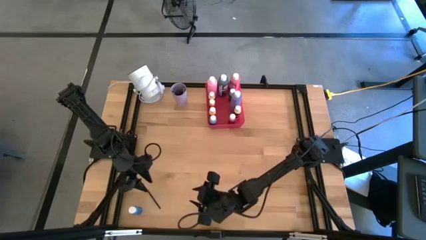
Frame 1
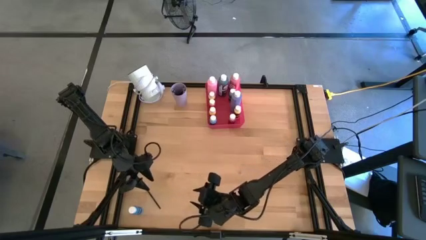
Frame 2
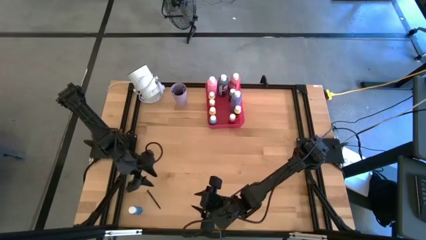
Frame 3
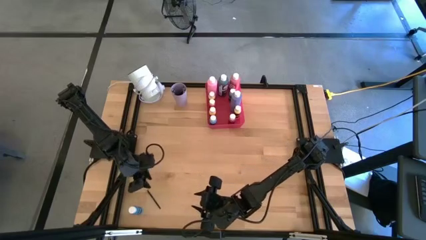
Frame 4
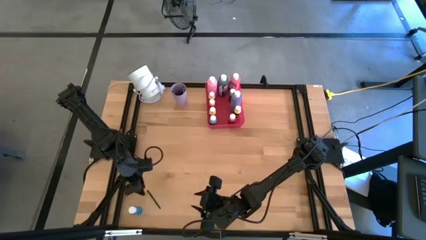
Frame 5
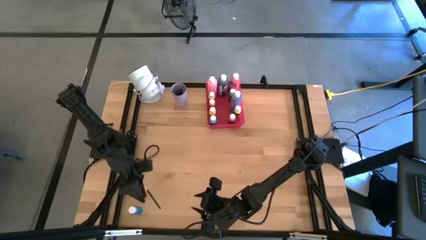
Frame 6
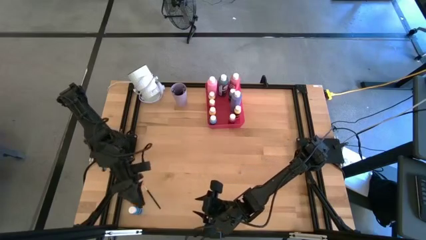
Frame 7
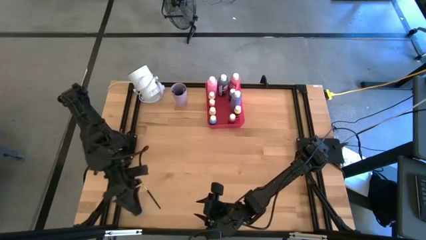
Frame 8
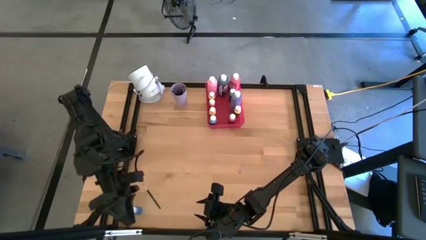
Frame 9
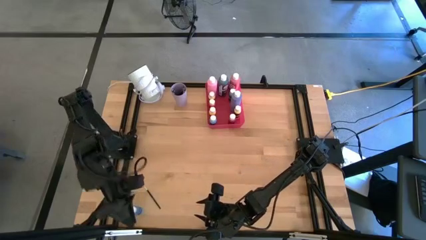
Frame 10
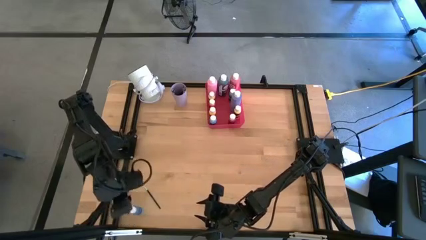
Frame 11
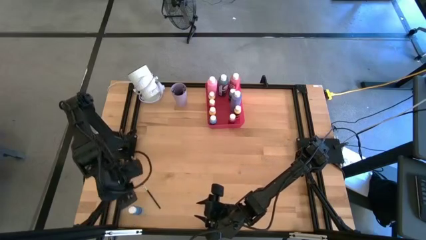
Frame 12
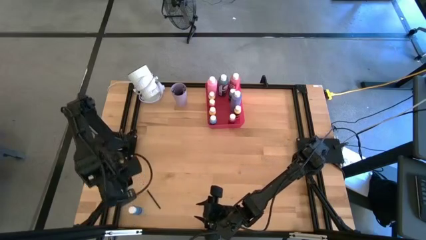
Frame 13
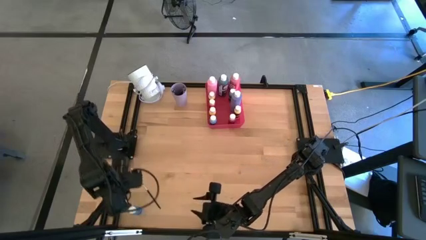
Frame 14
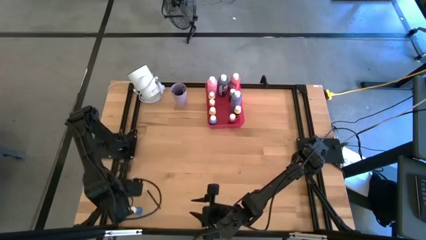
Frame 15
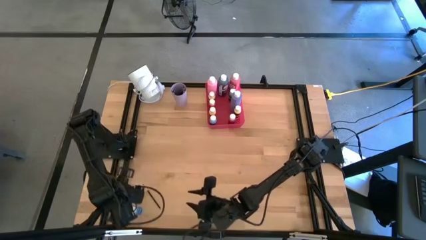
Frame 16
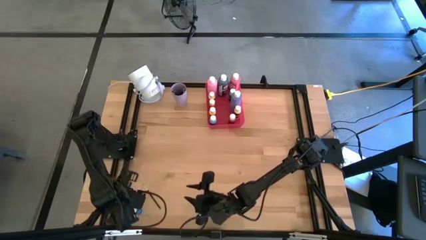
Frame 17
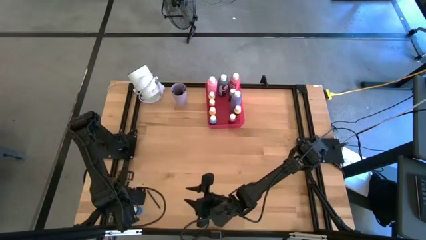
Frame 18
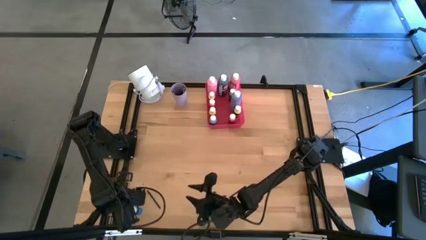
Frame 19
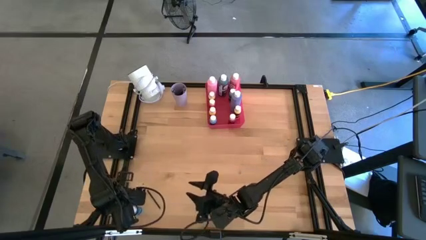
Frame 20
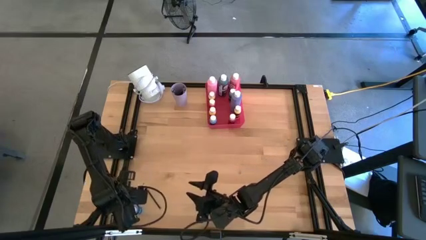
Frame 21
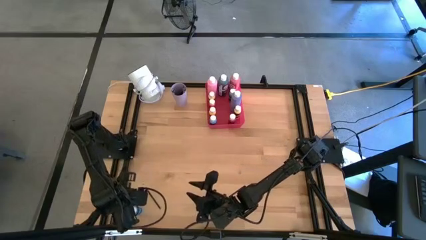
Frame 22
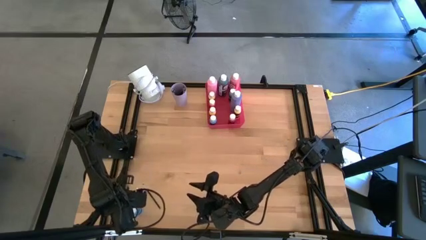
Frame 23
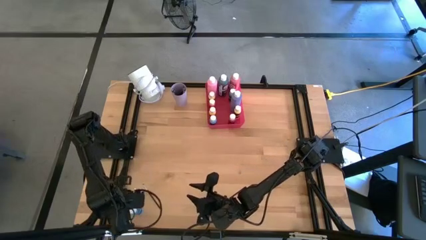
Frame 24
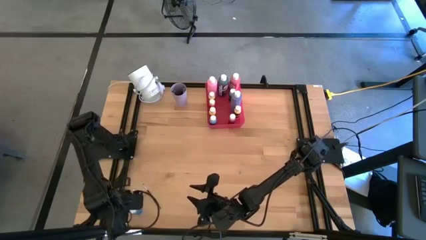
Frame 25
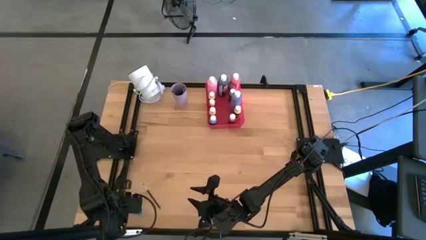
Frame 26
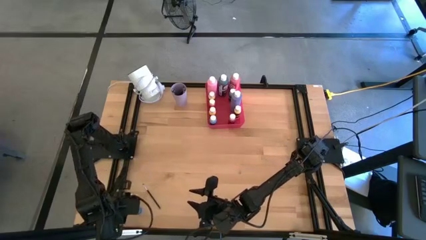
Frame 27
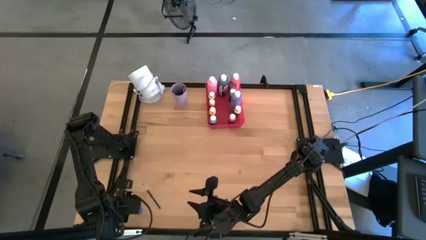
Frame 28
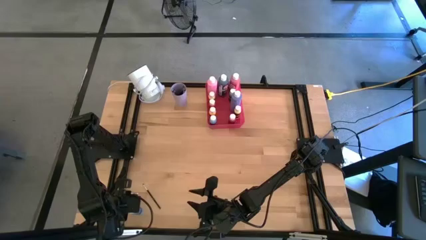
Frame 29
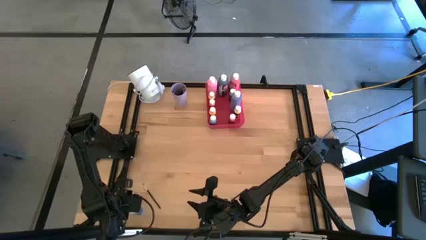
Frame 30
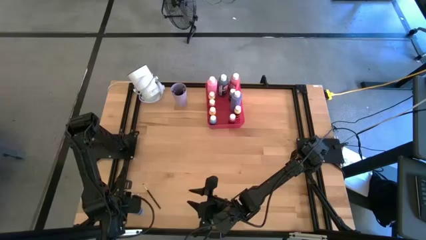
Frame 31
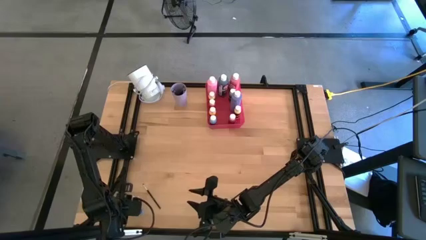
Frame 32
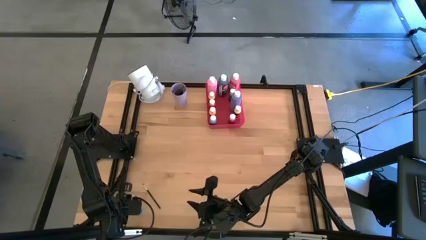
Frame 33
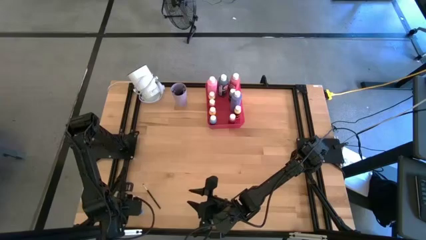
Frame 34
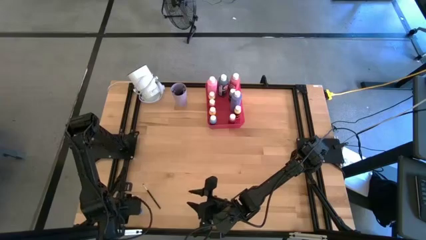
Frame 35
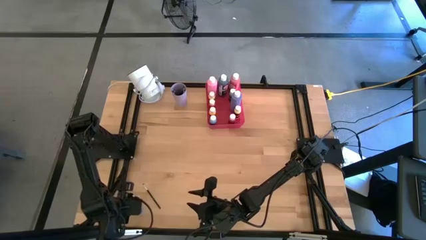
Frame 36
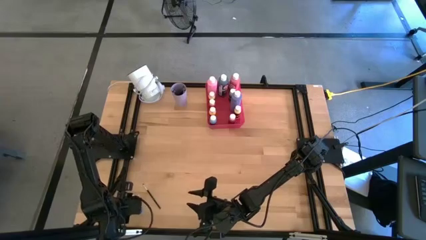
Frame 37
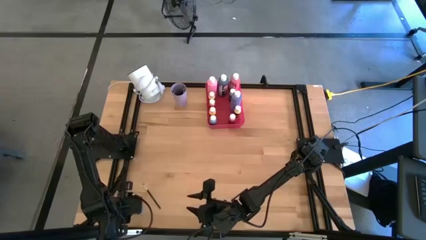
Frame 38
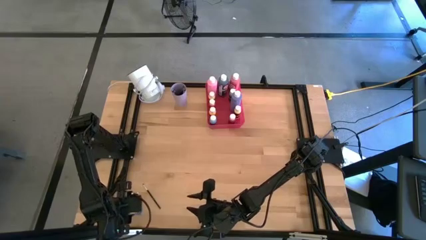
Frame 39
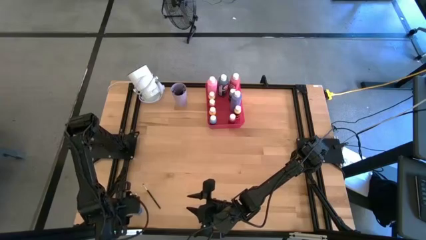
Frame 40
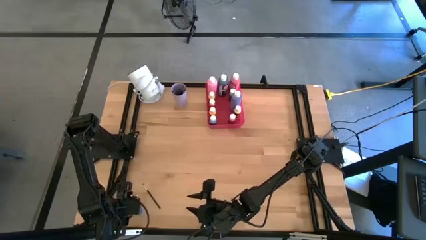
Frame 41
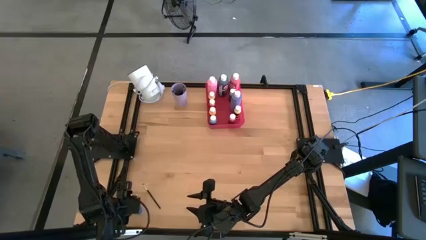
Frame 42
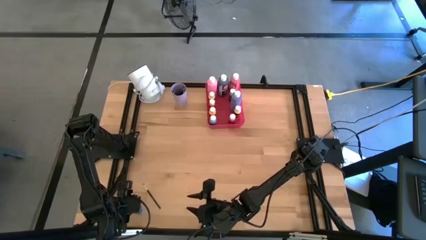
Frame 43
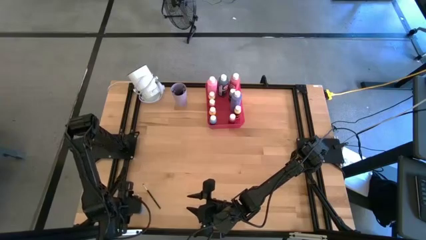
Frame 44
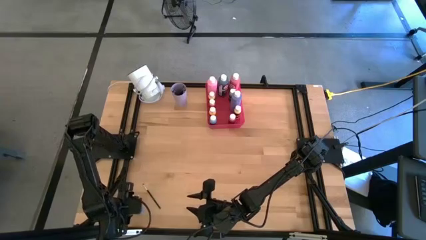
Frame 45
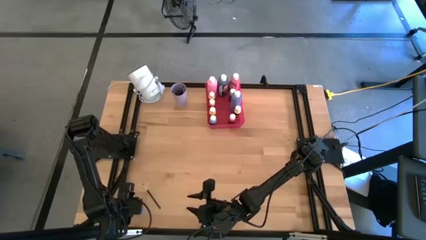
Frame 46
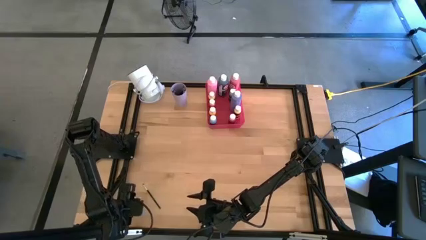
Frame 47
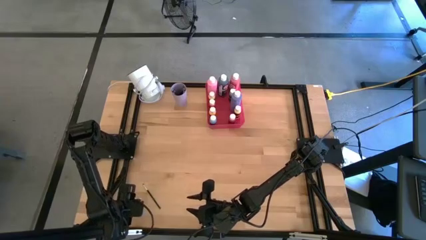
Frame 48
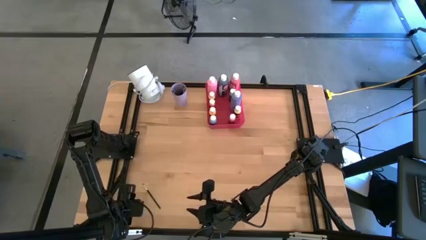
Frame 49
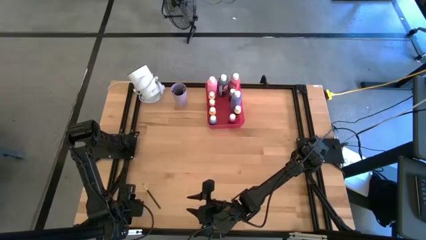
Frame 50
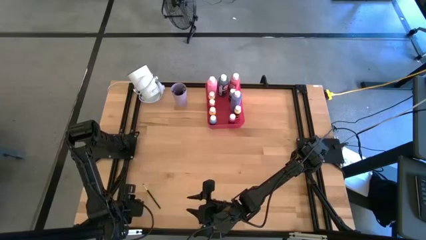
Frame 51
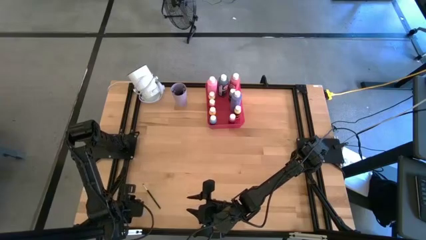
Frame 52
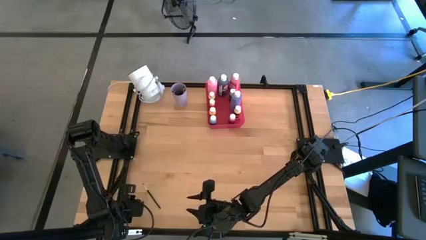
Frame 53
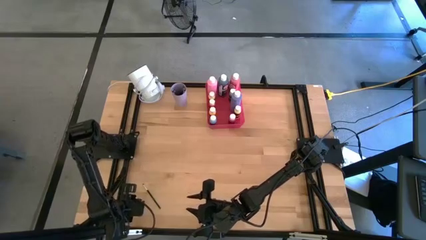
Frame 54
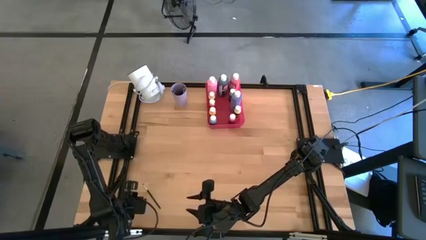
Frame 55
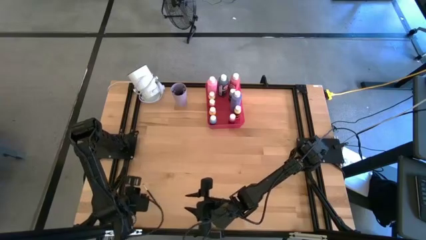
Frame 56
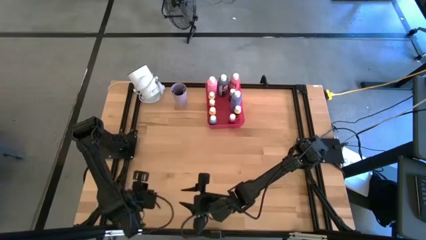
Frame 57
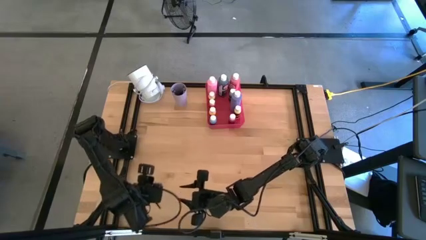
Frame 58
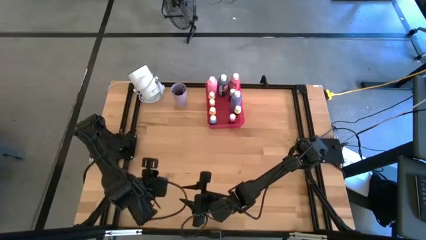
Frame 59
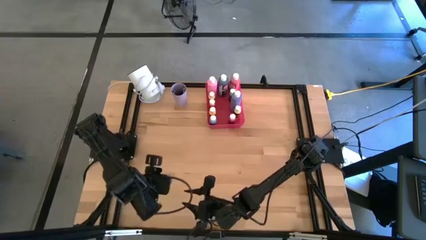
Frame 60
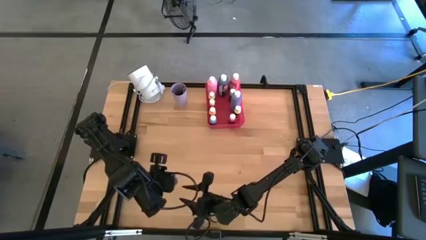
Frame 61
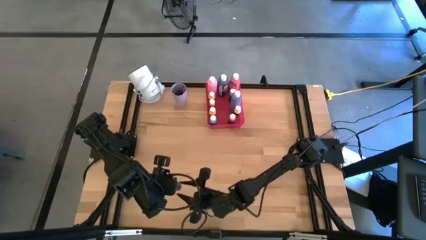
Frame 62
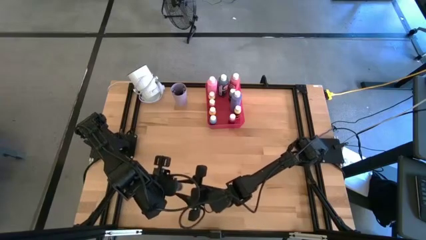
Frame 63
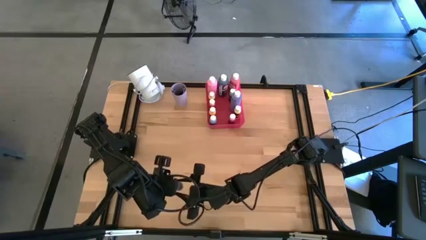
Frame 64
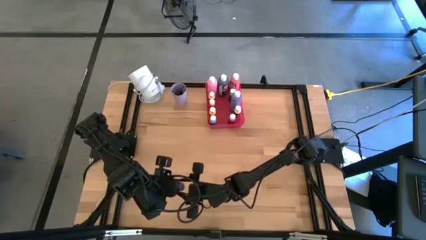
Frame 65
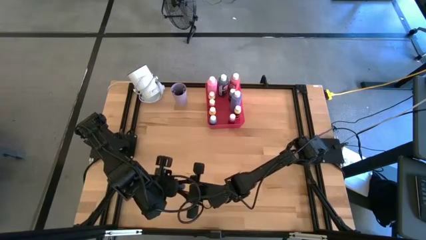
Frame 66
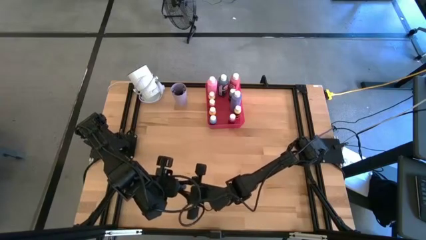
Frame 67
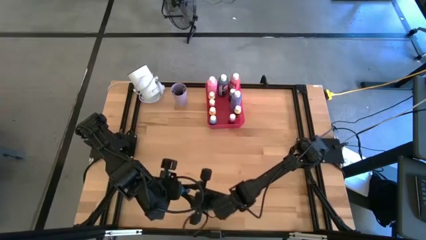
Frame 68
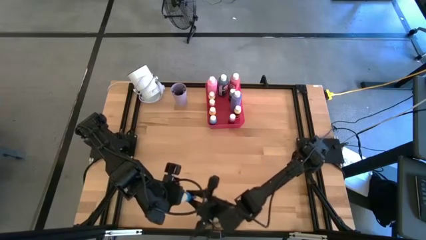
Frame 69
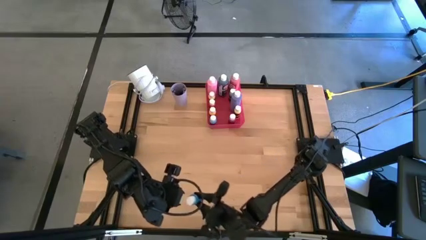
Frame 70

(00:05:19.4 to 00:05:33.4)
Task: Pick & Place Paint Supplies
Put the blue paint bottle into the red bin

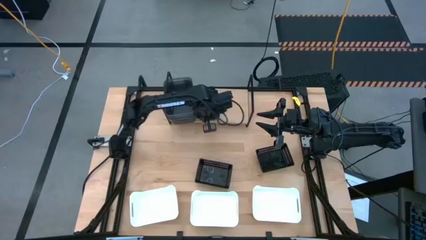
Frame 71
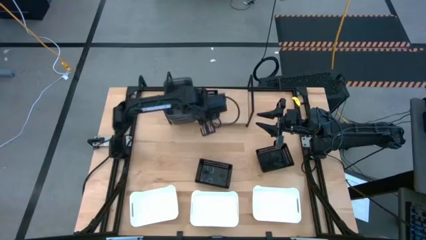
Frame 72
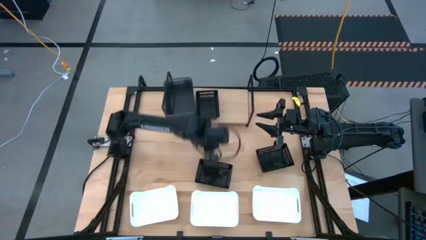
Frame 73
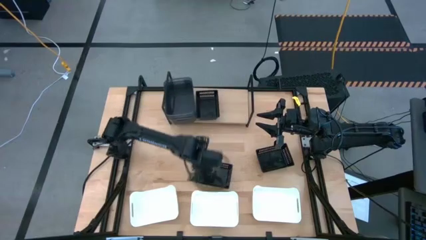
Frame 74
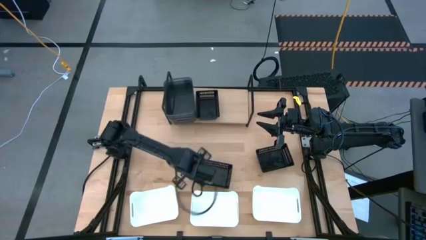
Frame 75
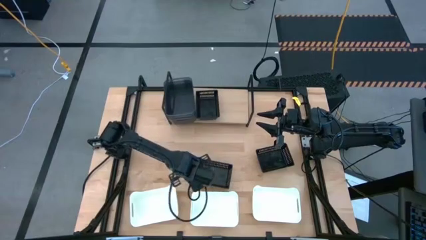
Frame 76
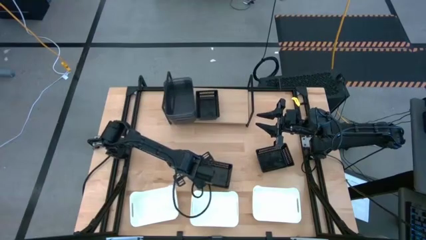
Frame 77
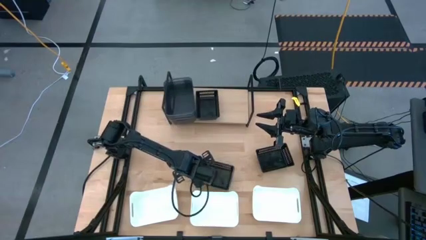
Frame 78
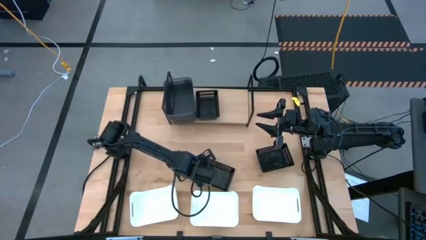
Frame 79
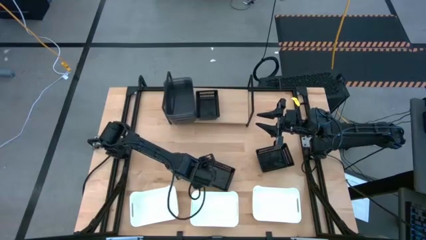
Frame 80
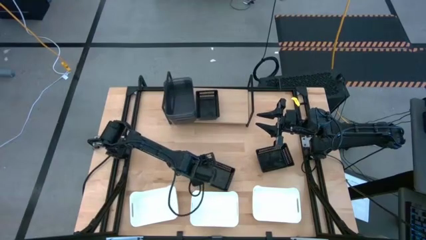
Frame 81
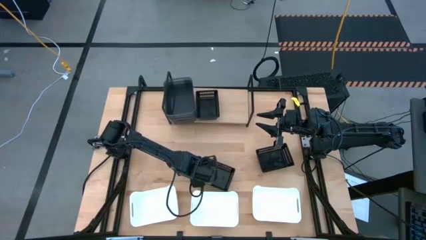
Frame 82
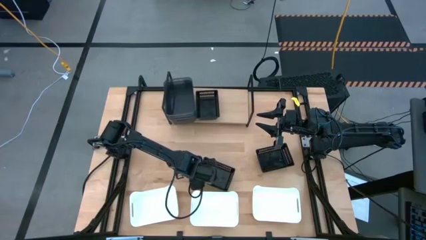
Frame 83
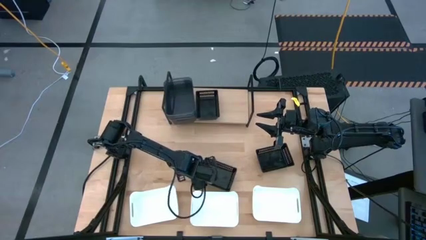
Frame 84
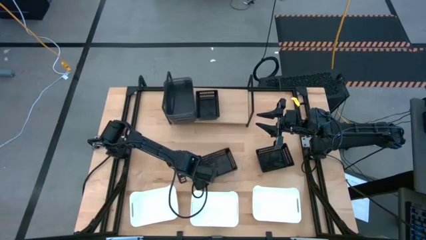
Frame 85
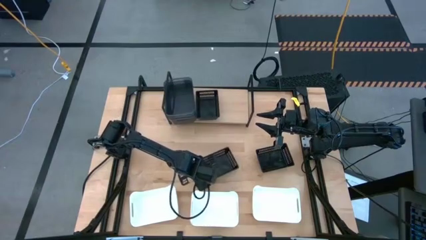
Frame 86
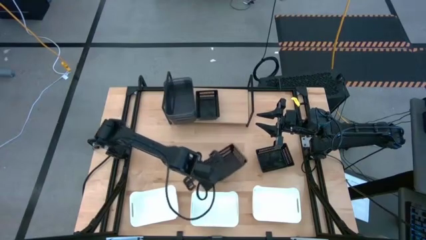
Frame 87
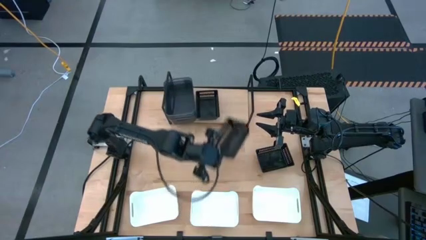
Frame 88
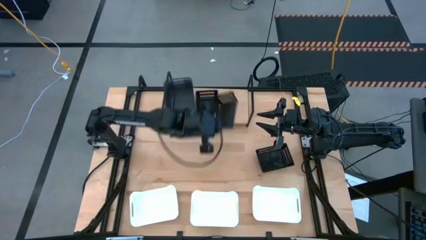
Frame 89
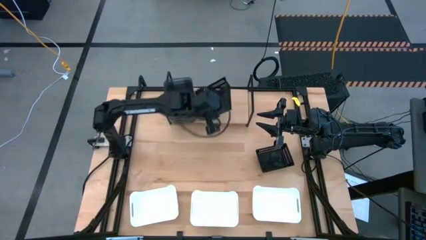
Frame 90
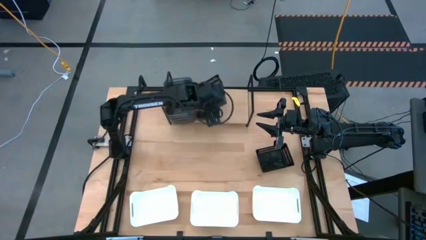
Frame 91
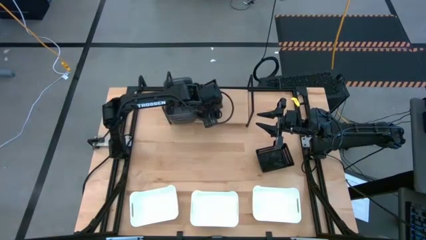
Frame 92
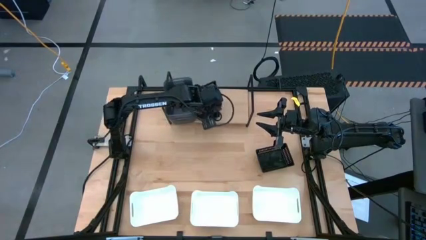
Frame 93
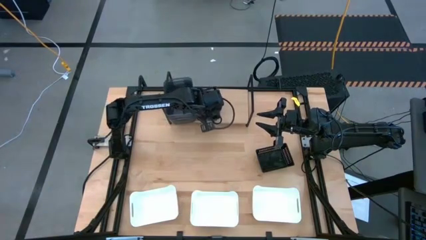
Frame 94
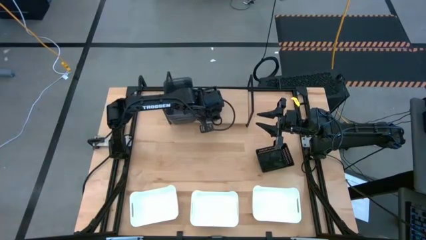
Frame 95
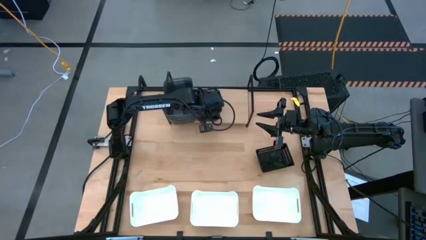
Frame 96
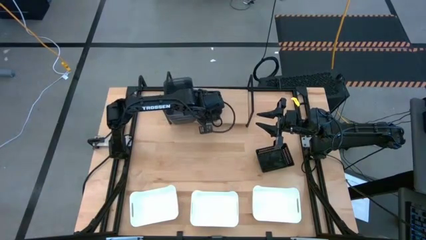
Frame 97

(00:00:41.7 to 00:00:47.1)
Task: Stack baskets on shelf by color
Stack the left black bin on top of the black bin
